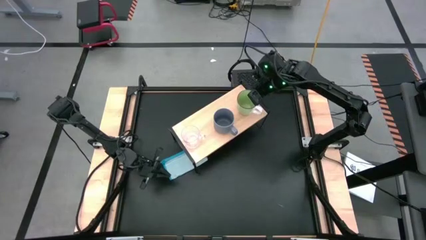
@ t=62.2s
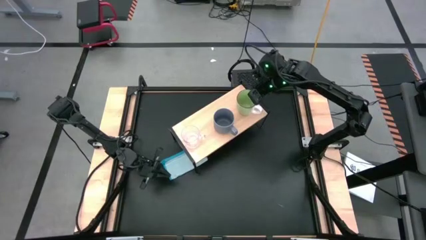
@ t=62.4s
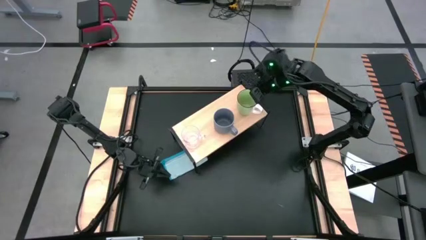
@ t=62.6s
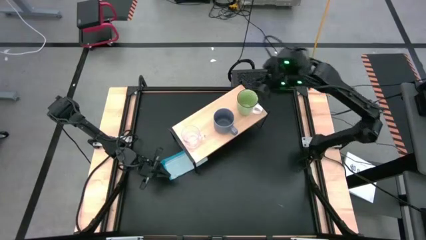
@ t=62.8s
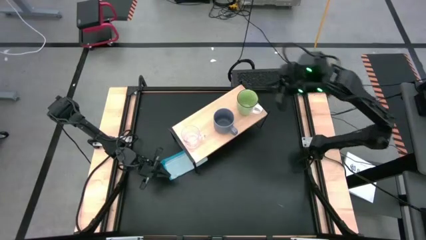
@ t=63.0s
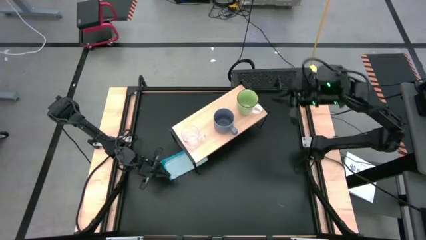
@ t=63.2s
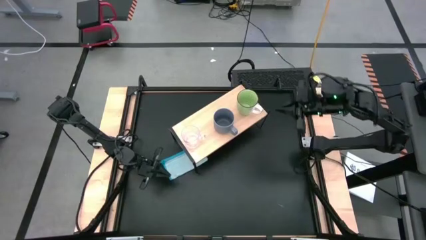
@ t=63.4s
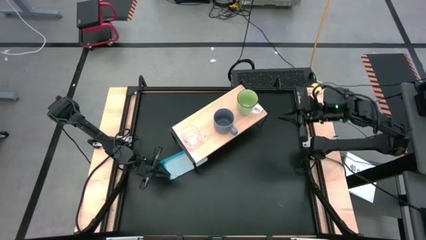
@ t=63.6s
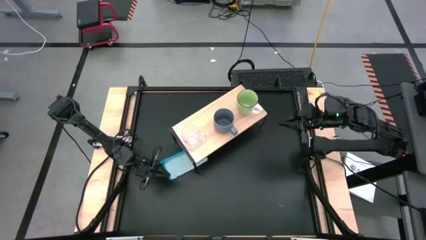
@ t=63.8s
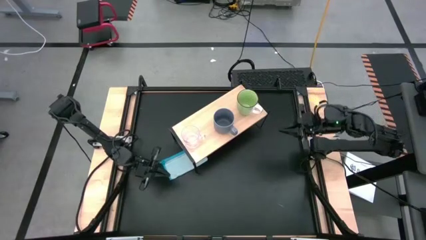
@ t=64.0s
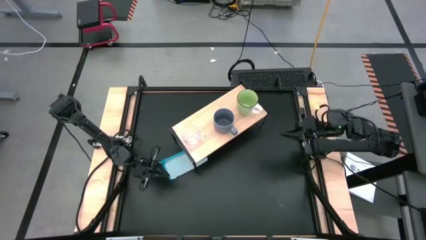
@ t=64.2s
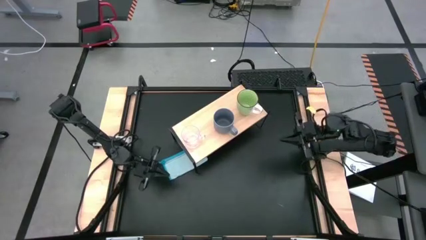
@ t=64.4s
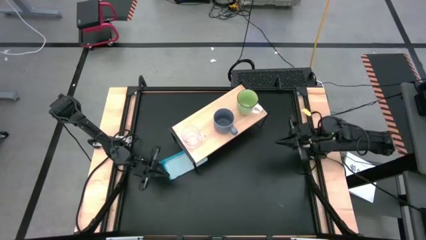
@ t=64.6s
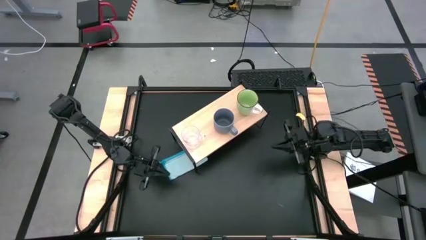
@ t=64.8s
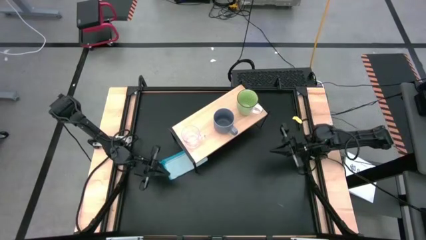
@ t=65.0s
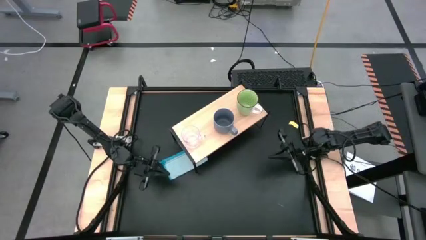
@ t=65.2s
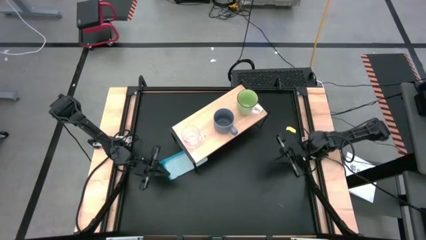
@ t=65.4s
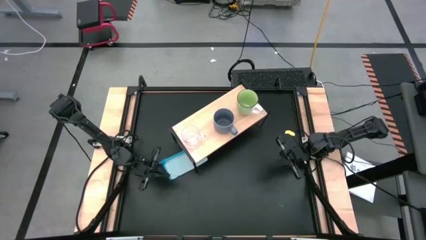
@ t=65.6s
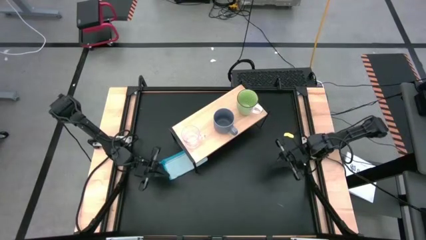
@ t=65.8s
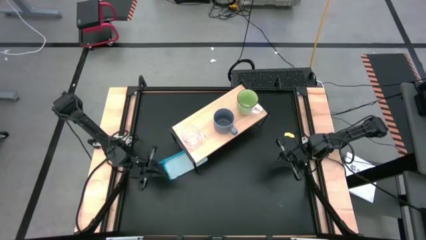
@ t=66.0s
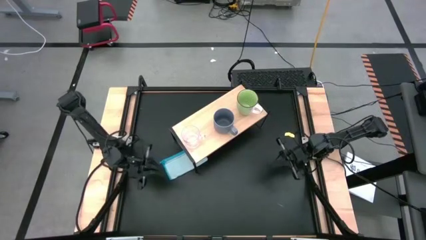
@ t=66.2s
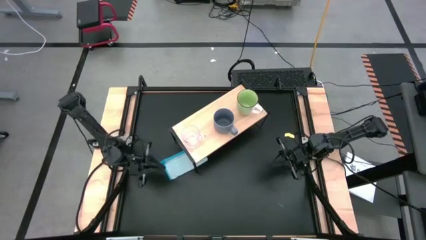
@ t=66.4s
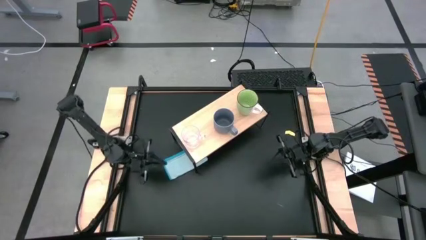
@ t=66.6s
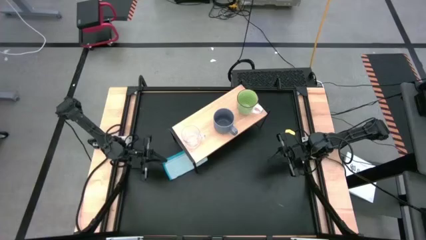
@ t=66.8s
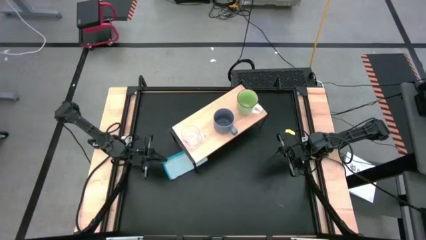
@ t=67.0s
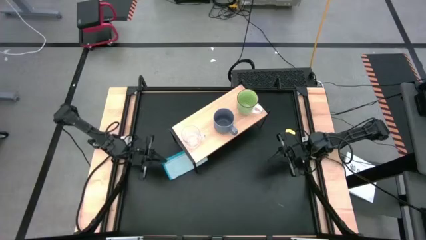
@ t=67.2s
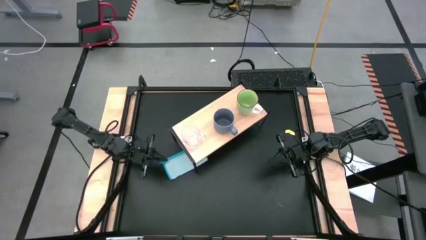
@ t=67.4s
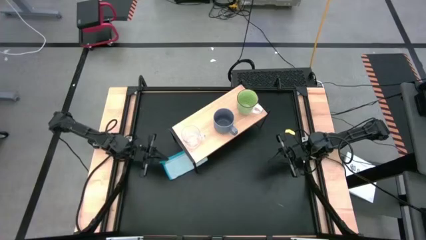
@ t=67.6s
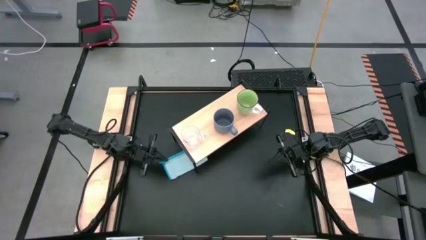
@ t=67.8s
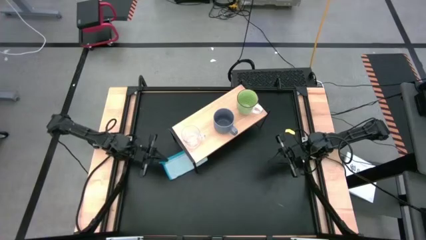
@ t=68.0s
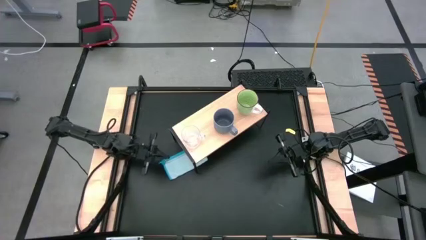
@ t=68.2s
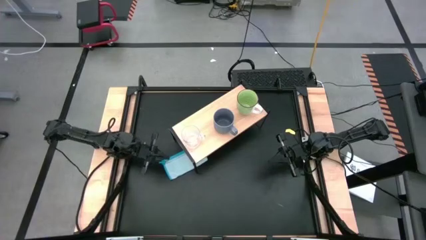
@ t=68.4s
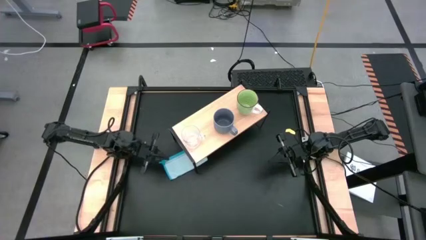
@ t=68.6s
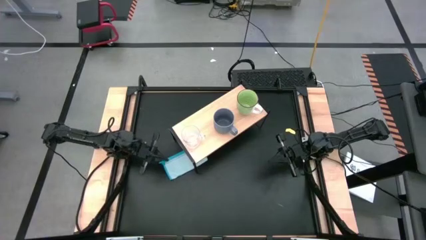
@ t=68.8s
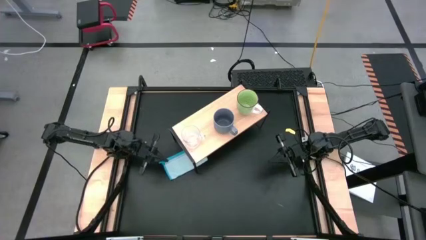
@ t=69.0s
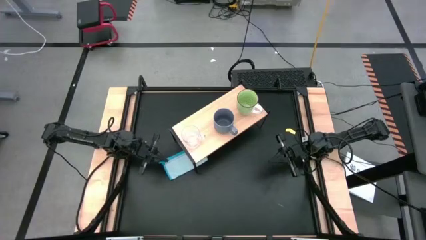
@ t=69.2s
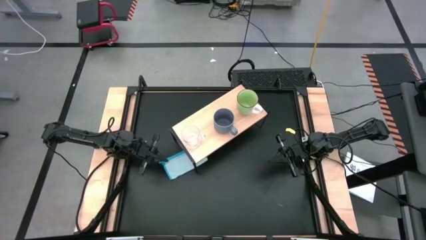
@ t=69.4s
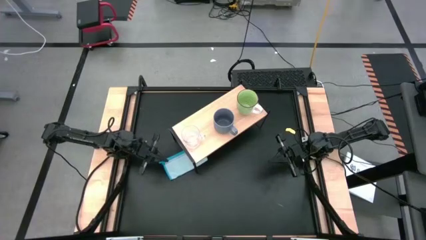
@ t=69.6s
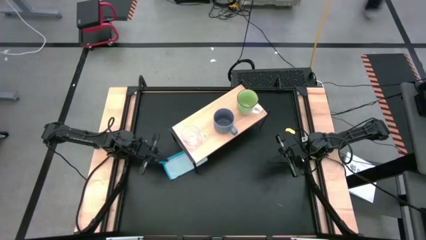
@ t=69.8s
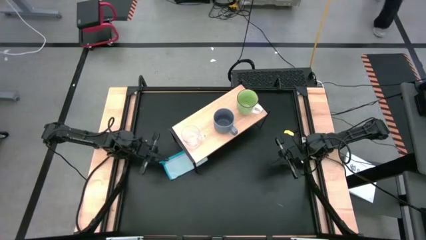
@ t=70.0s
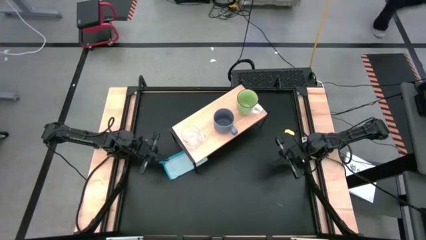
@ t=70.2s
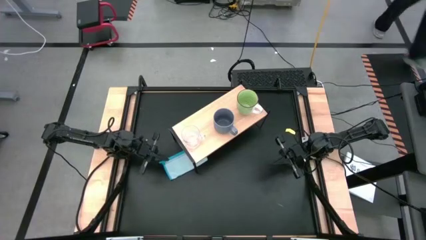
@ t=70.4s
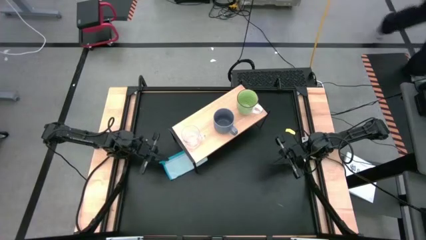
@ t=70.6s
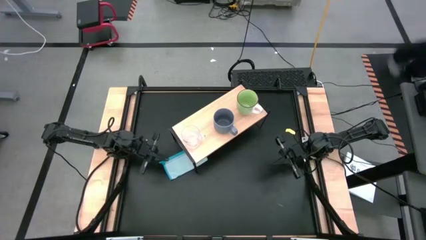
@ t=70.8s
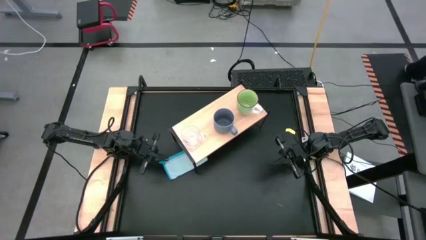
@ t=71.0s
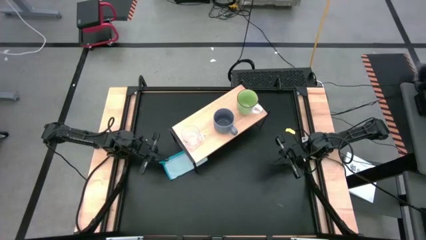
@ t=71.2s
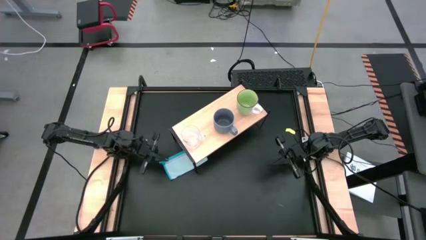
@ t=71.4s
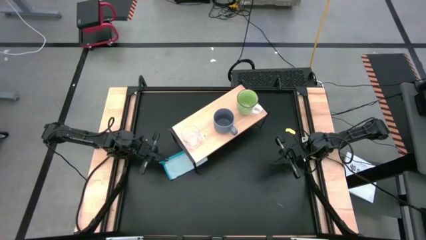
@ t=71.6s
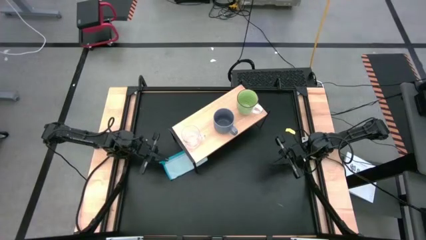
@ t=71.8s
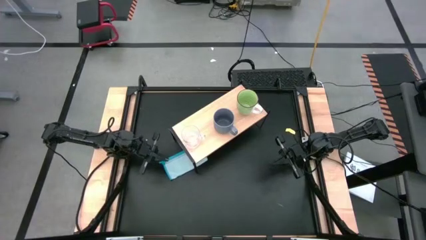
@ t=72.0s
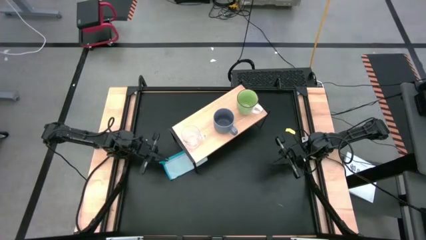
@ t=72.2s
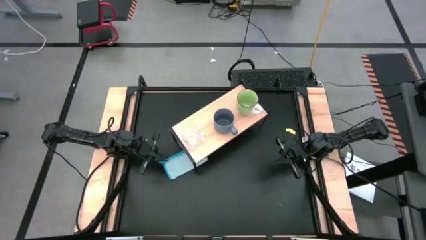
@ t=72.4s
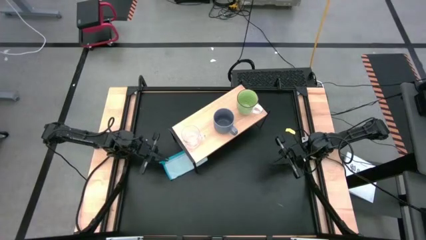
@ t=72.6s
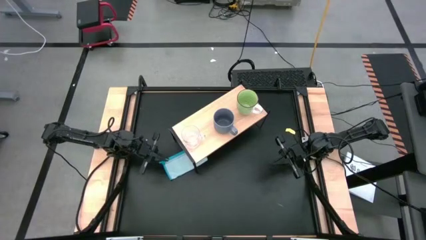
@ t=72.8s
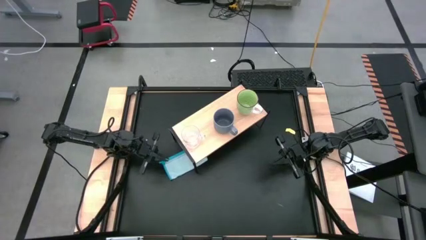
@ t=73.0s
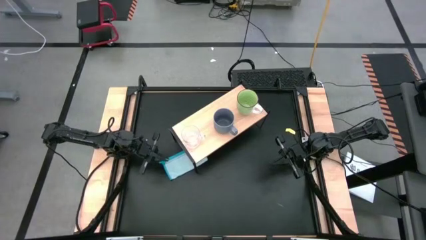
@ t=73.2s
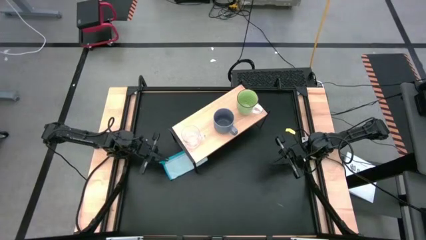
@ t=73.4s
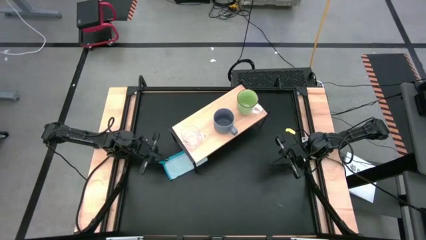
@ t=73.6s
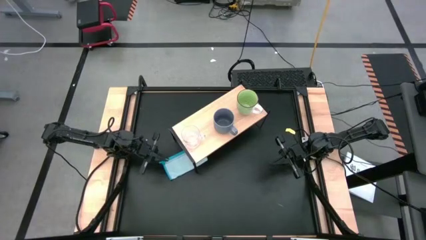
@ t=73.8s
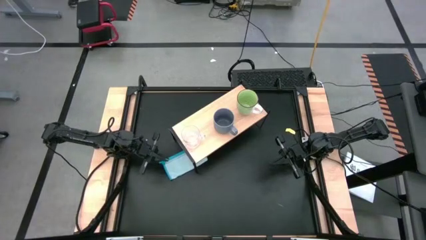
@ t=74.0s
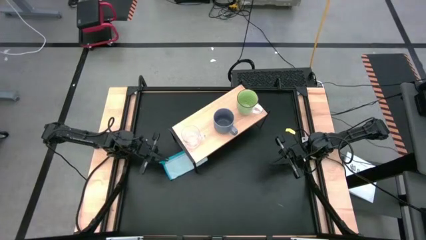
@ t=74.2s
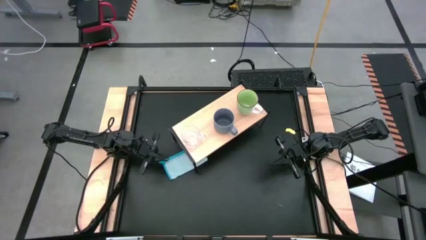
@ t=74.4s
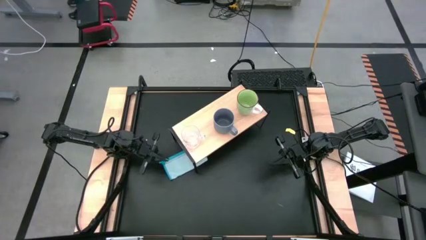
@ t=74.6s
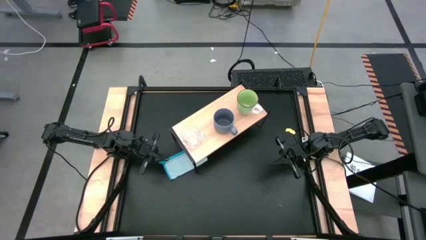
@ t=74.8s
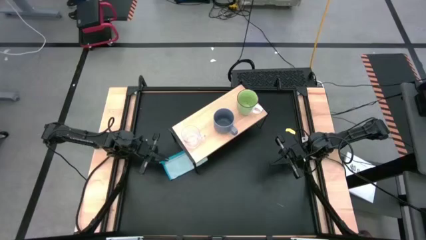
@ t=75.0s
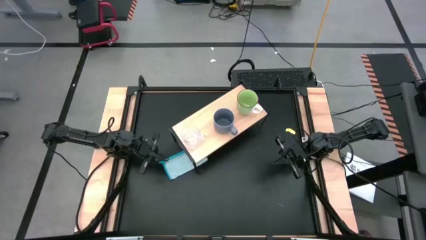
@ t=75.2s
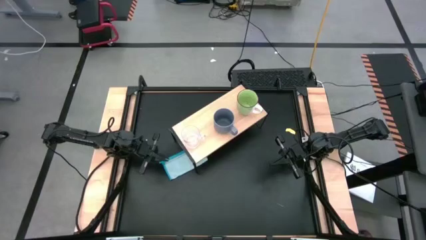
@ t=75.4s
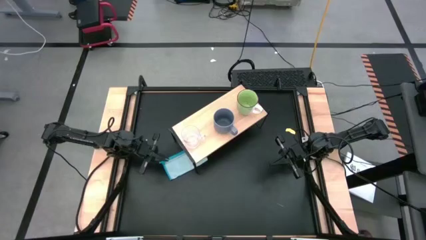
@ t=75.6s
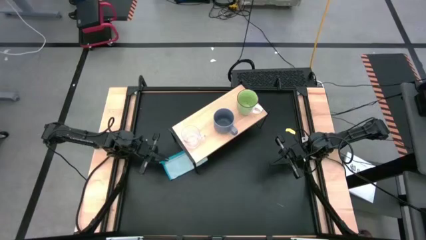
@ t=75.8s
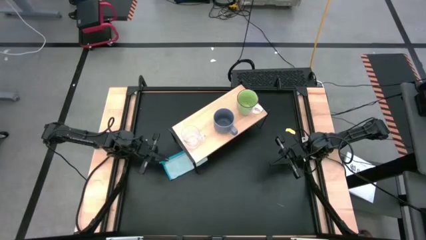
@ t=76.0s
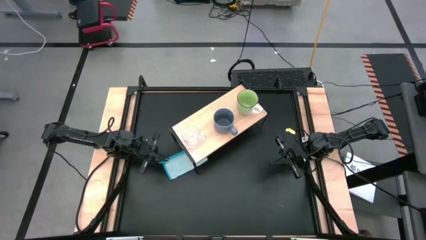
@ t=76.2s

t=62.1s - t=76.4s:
Task: Stack small to large cups/mugs on shelf
Return to Home Position
